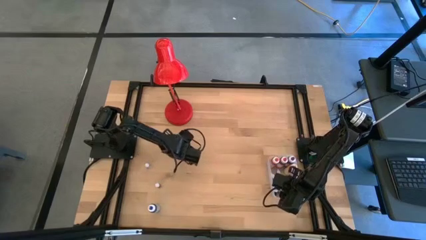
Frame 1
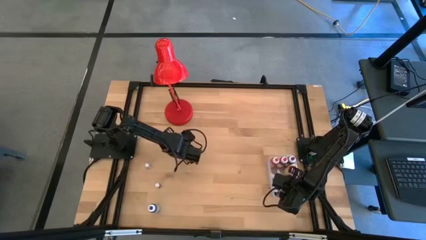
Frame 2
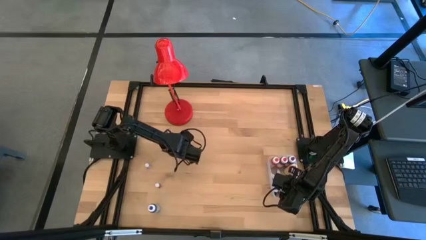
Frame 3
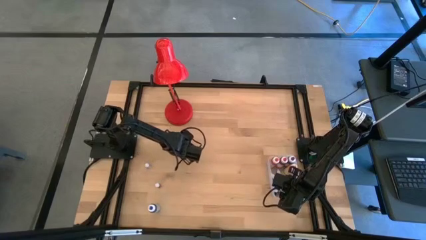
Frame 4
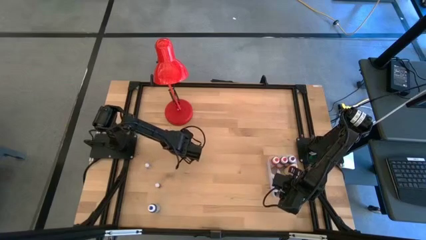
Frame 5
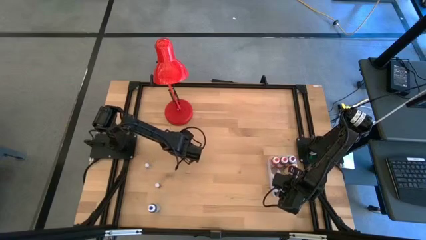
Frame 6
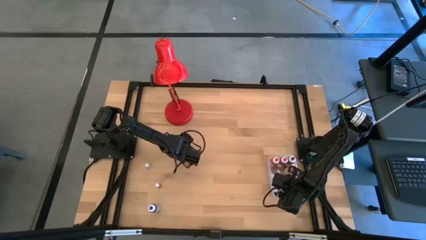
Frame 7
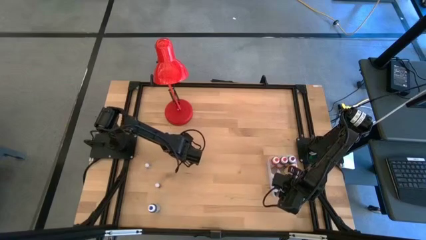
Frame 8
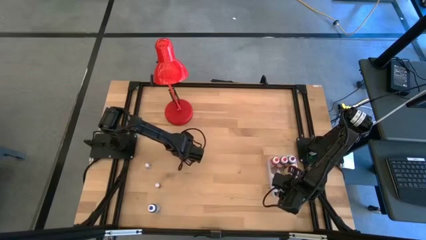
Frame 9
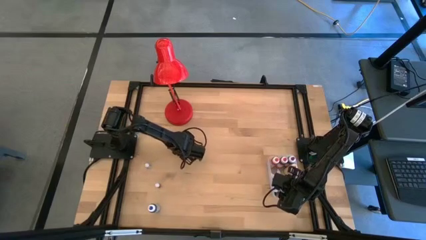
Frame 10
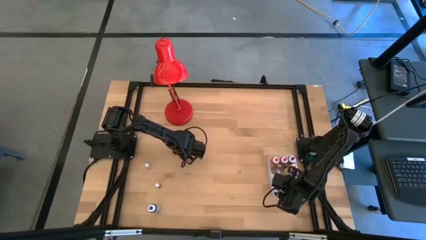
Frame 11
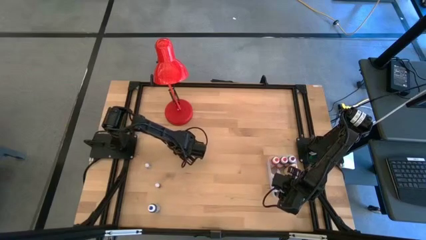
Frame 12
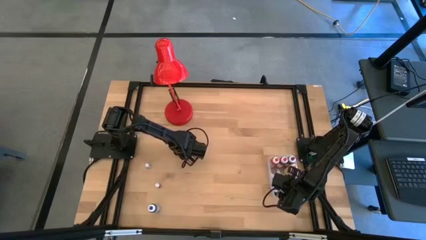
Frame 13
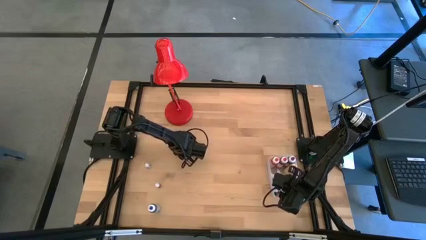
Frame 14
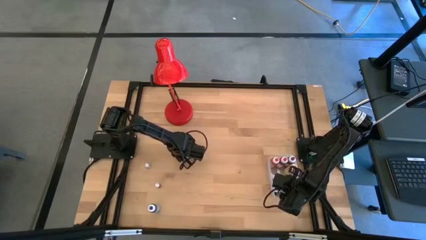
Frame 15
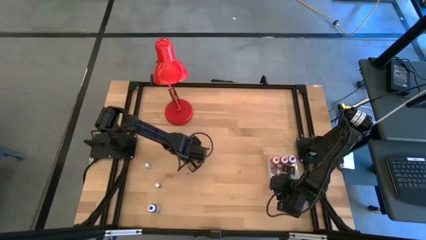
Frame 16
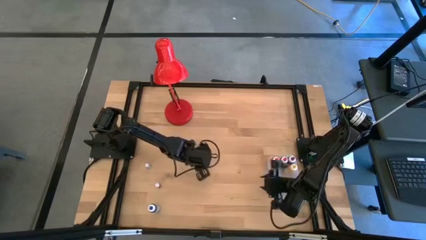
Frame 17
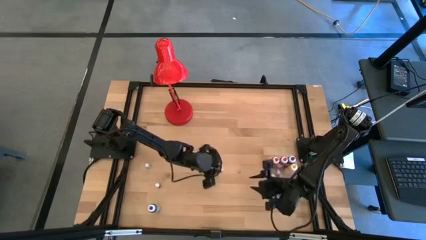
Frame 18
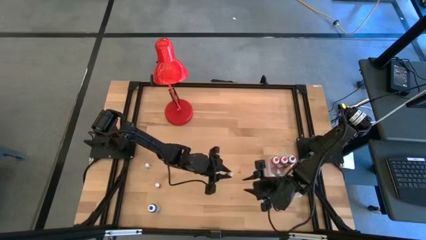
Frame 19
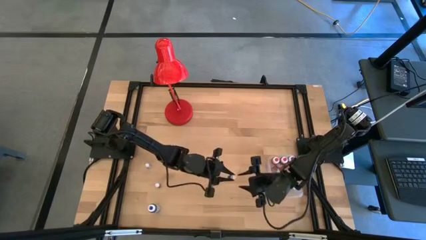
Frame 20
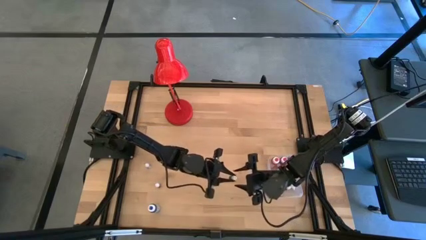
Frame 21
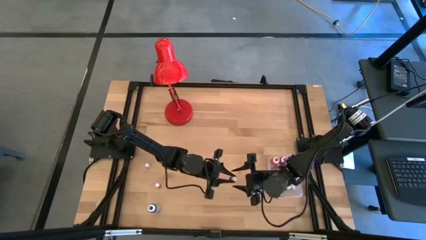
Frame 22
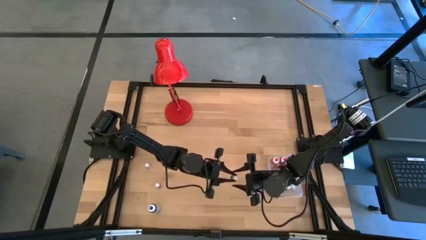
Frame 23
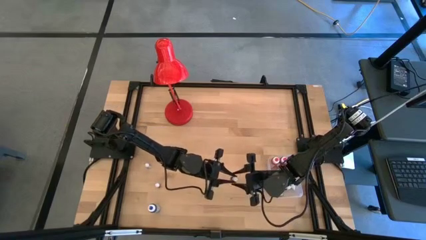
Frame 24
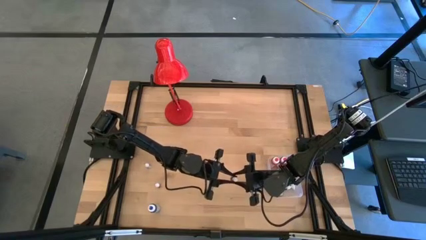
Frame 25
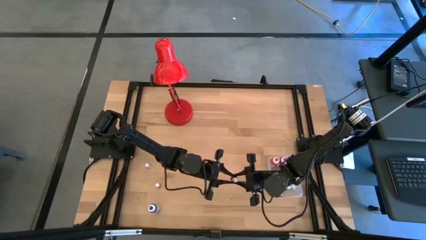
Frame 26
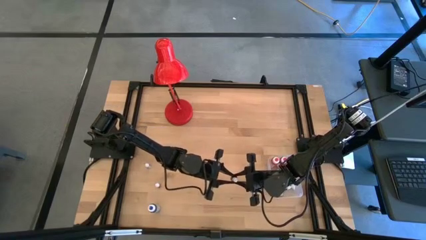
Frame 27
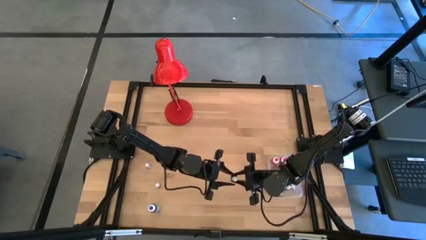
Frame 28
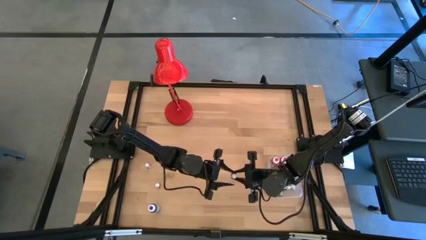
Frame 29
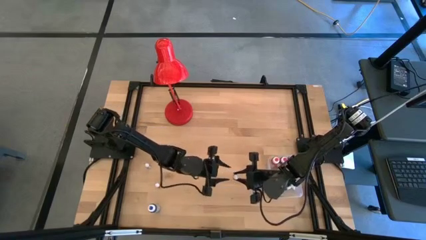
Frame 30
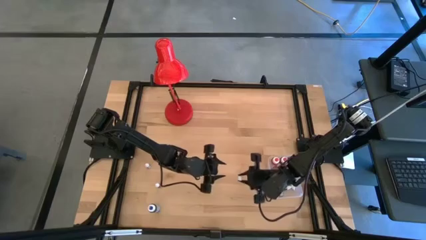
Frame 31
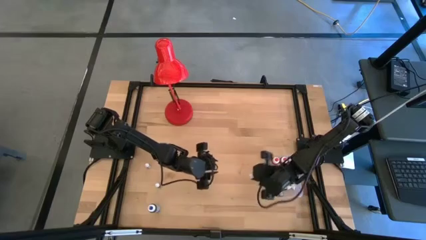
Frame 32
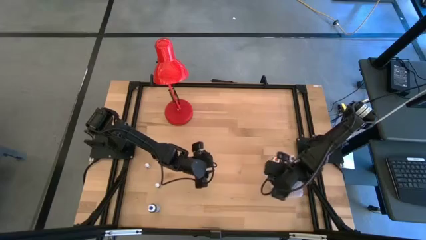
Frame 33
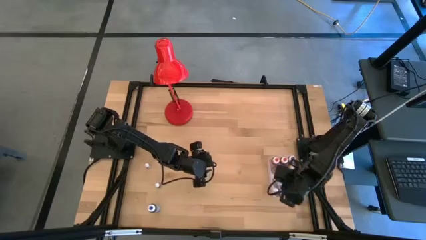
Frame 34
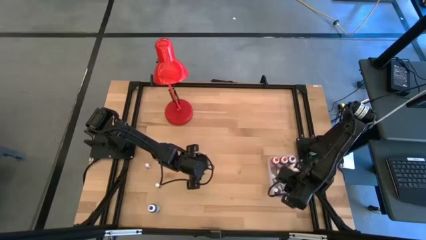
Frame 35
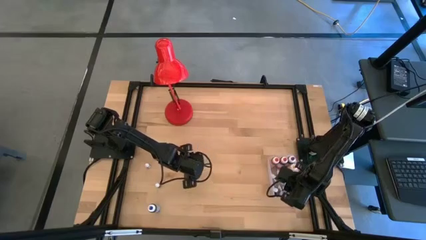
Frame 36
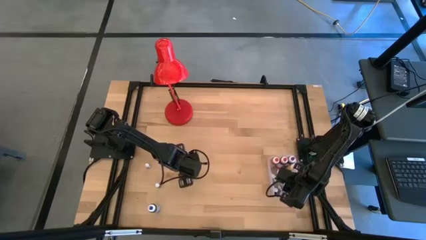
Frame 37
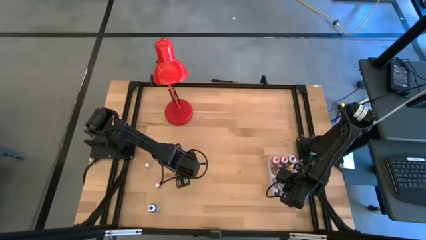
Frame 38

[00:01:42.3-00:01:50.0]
Task: Pick & Place food coloring
Put the small red bottle into the transparent container

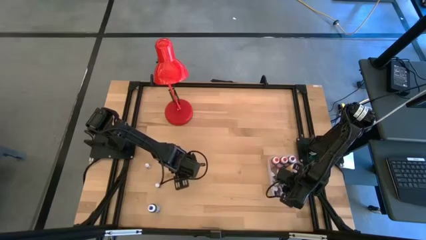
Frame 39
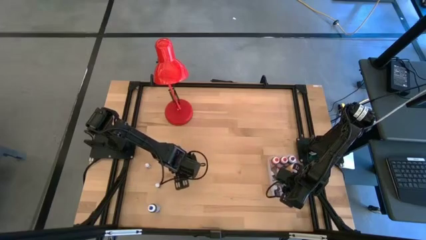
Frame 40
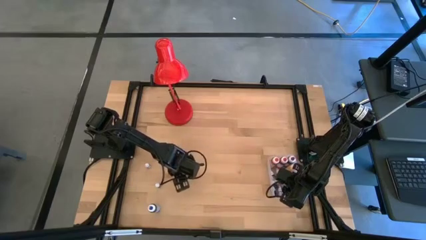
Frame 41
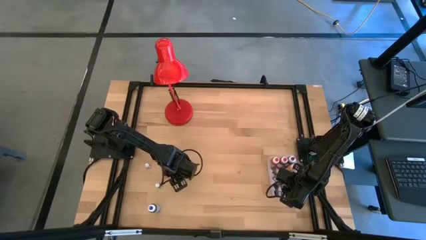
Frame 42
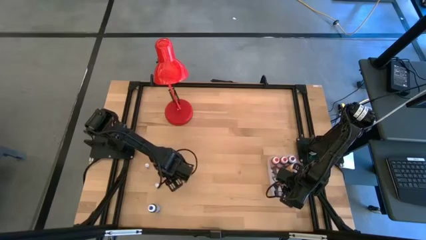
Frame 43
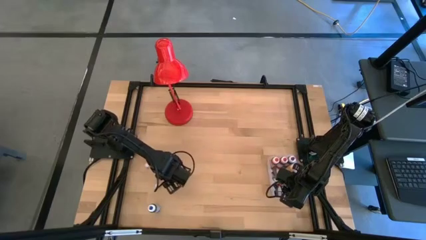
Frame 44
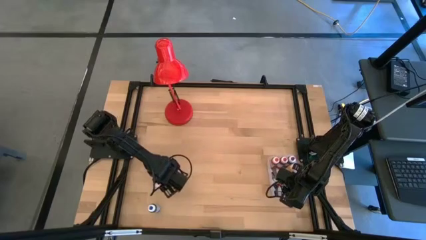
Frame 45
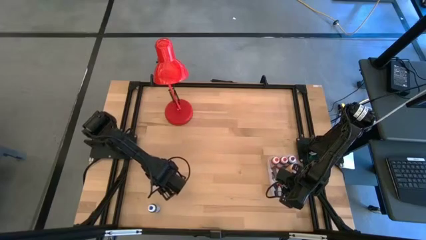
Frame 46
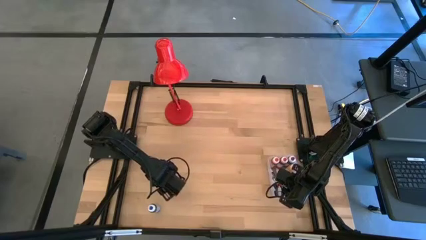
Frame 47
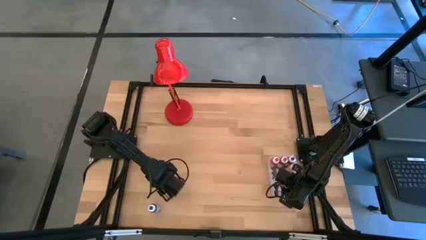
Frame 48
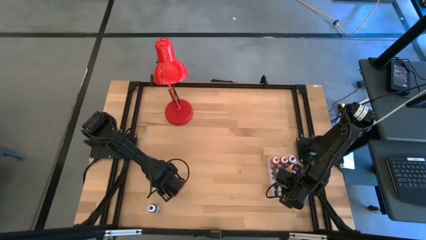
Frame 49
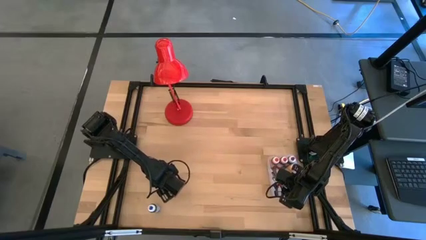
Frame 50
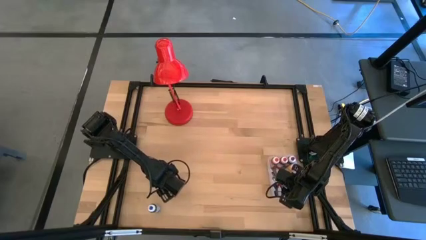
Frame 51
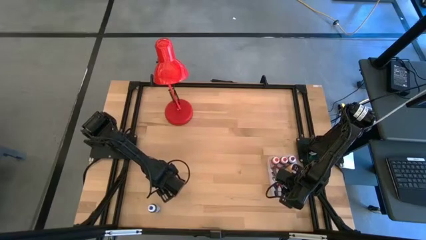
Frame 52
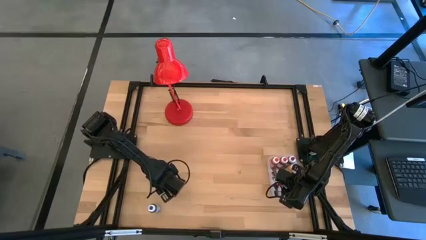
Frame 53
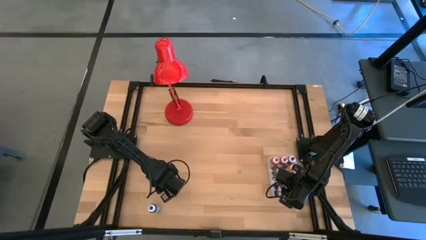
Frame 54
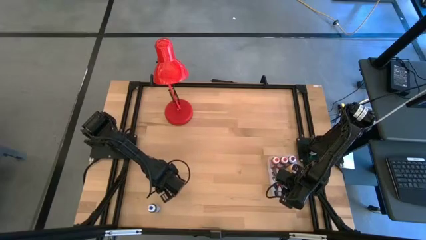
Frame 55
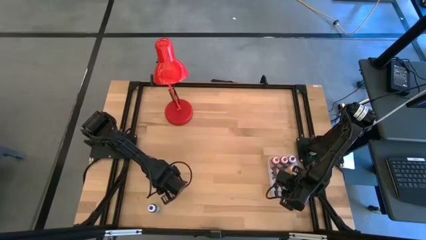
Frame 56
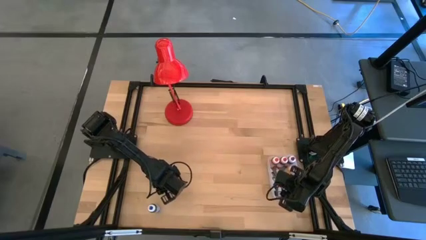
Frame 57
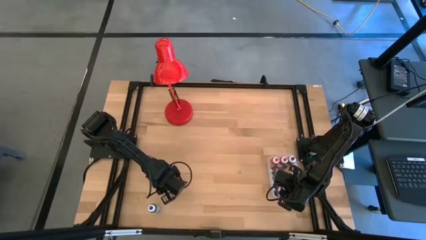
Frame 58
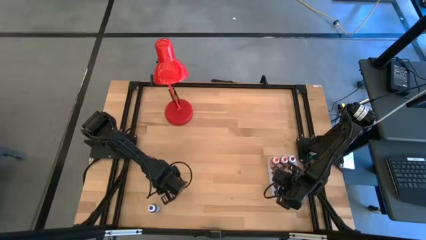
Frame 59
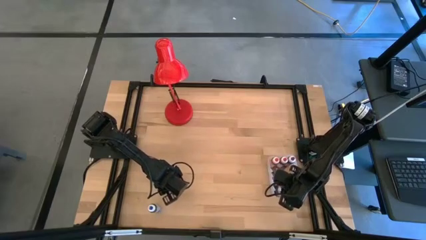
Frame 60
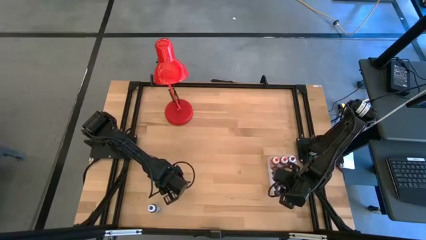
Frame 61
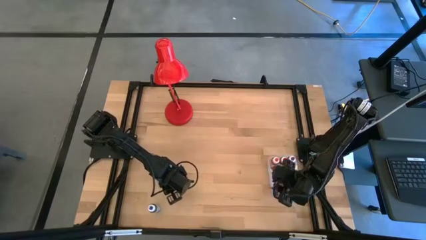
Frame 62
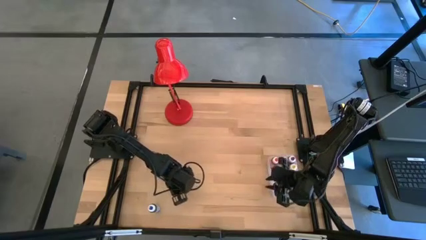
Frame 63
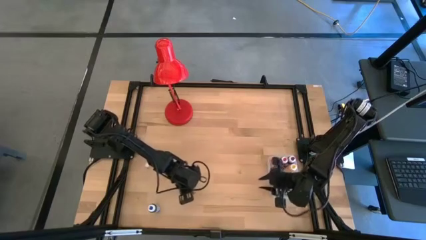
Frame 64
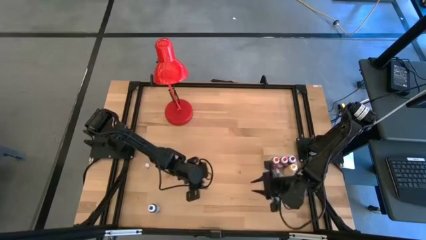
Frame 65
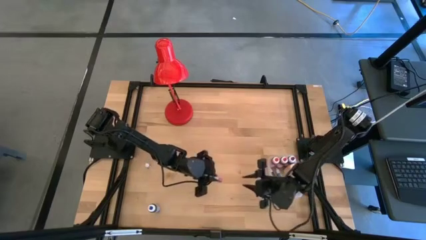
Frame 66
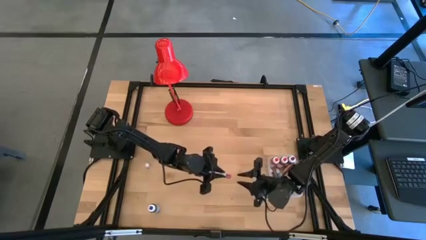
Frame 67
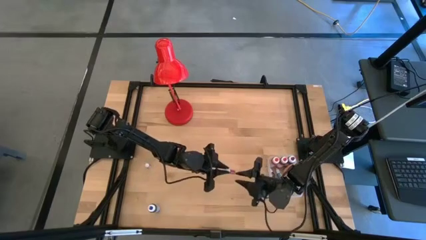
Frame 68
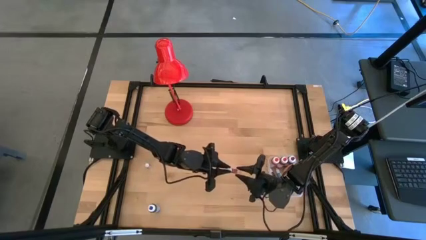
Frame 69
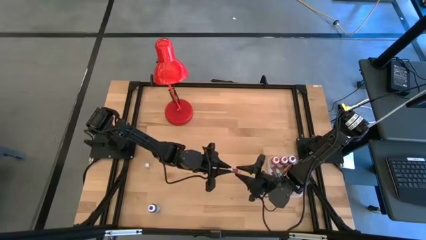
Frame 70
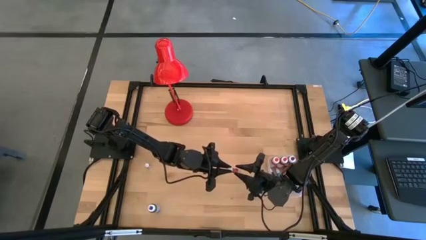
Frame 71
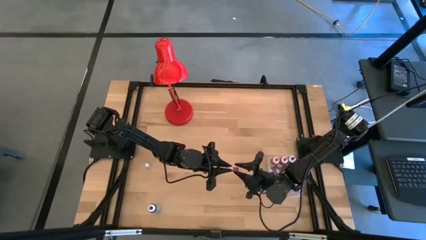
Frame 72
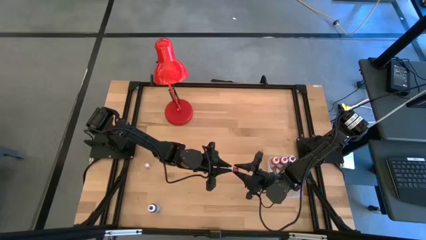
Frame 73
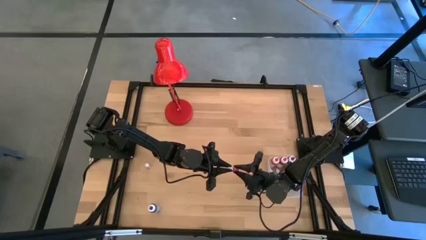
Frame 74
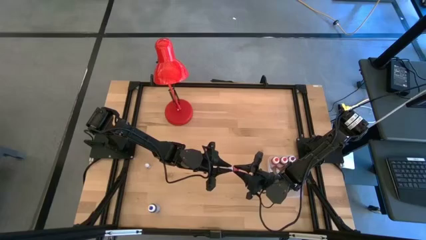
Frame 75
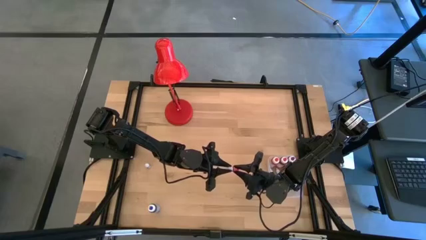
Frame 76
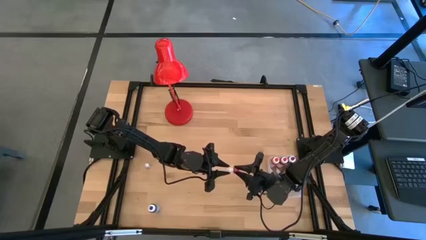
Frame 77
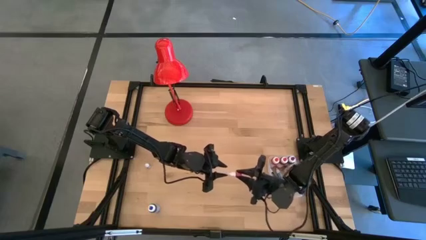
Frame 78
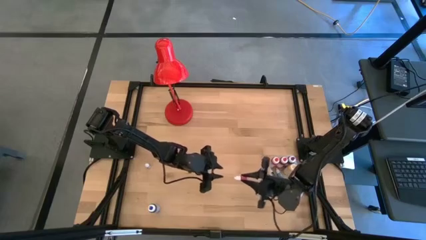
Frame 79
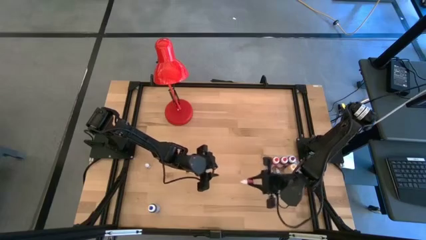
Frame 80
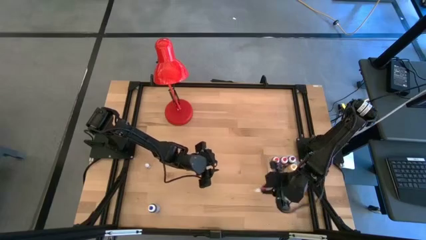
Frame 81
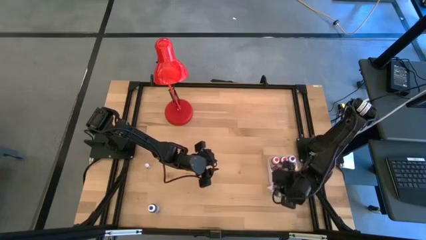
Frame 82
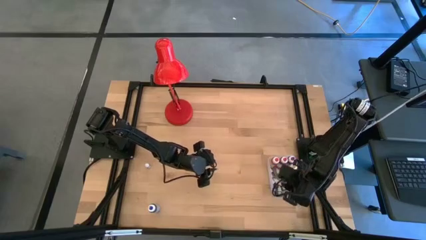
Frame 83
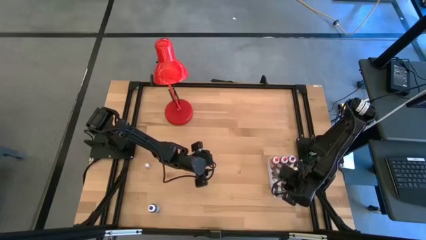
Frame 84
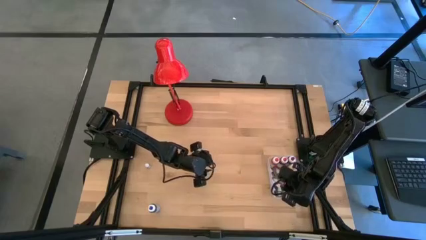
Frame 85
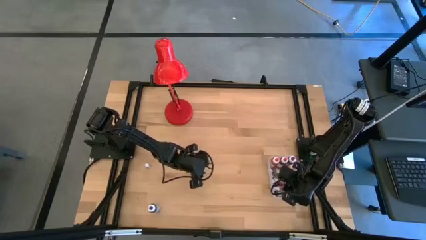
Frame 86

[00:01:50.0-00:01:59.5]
Put the small pink bottle into the transparent container
